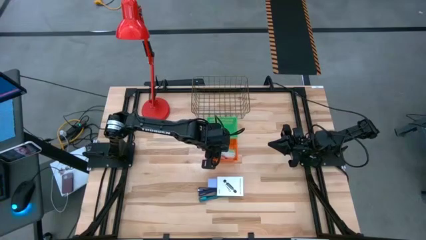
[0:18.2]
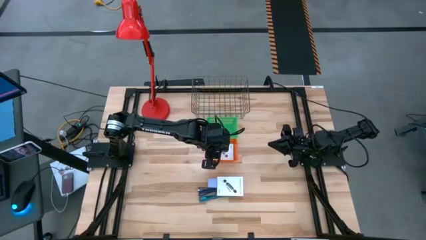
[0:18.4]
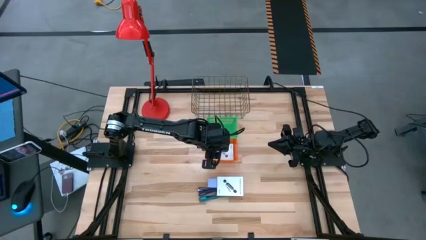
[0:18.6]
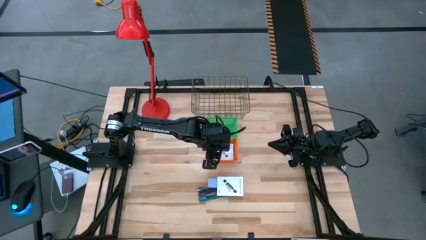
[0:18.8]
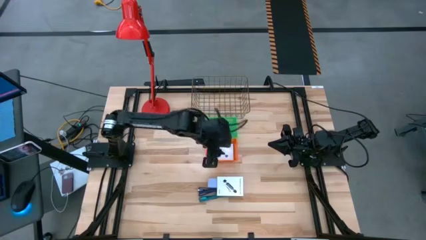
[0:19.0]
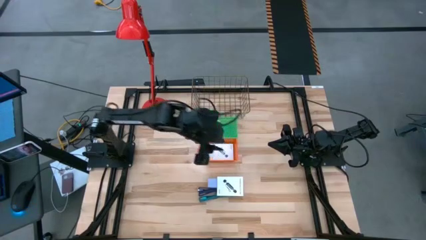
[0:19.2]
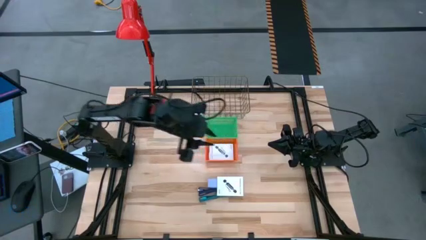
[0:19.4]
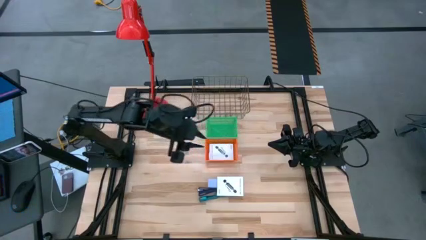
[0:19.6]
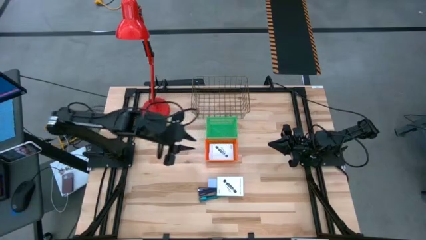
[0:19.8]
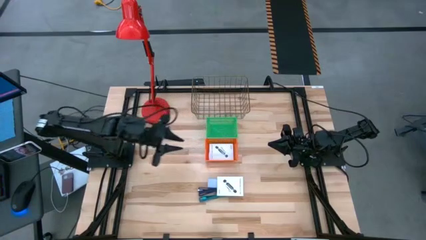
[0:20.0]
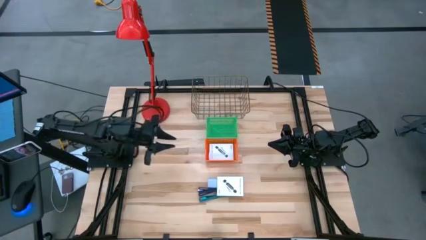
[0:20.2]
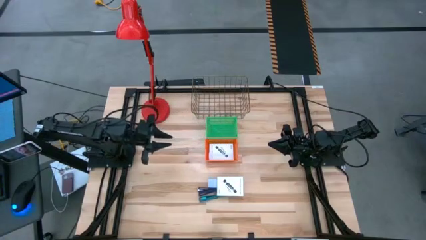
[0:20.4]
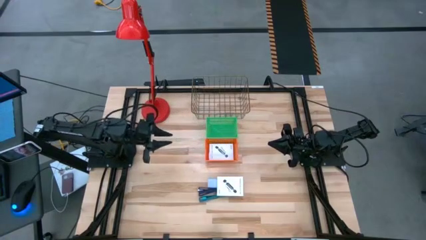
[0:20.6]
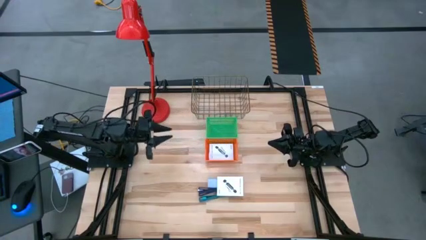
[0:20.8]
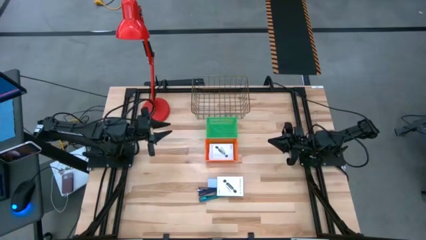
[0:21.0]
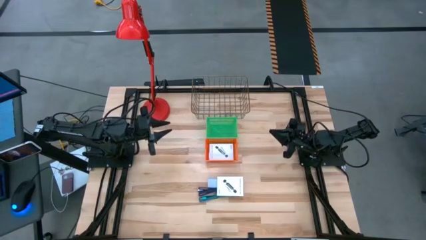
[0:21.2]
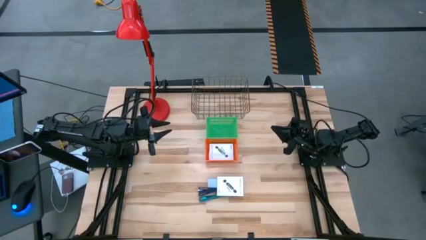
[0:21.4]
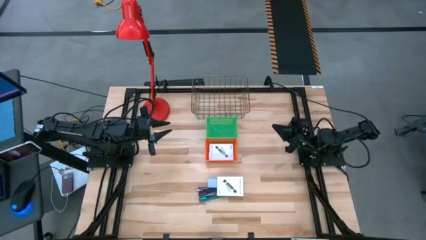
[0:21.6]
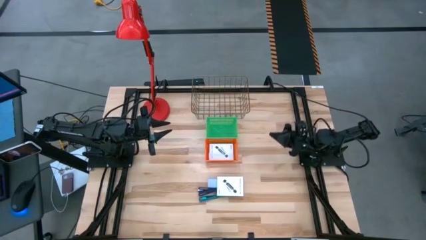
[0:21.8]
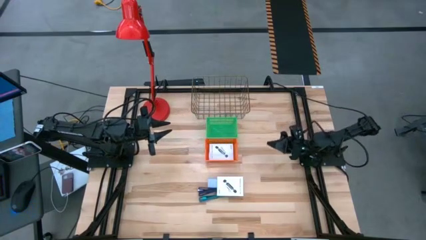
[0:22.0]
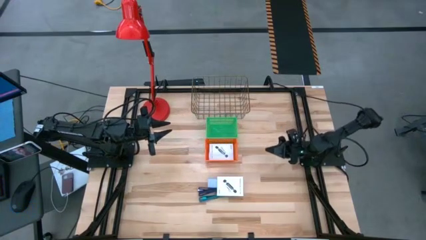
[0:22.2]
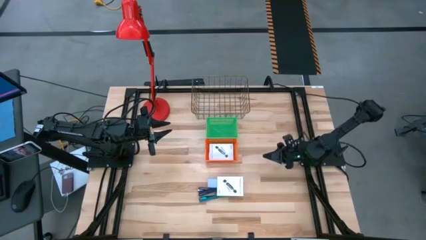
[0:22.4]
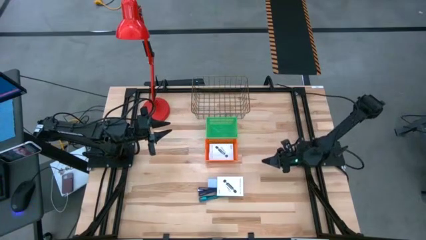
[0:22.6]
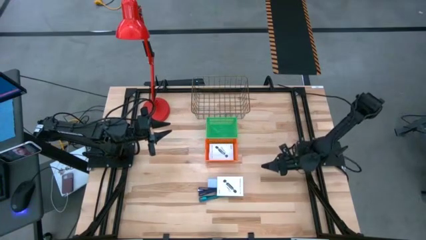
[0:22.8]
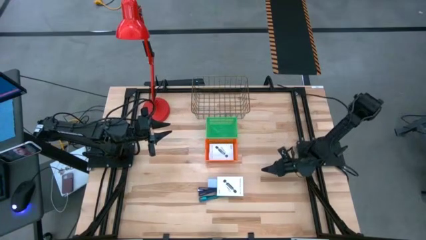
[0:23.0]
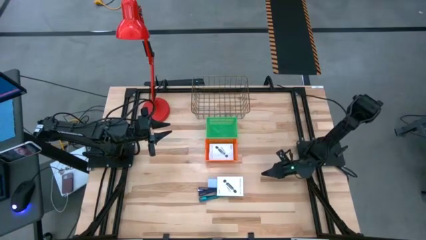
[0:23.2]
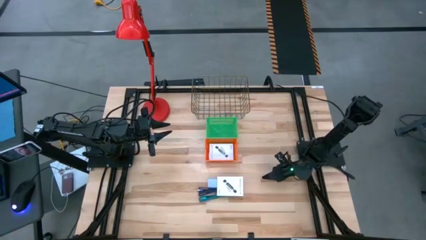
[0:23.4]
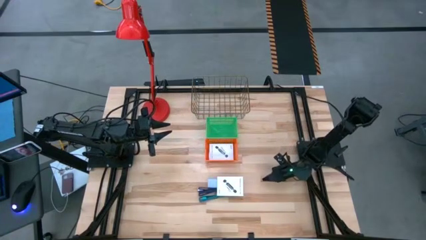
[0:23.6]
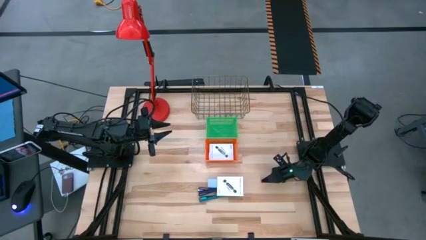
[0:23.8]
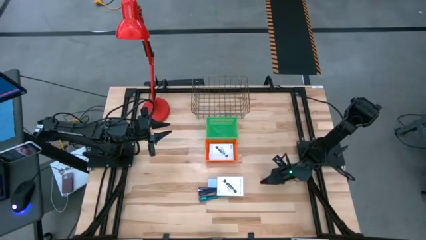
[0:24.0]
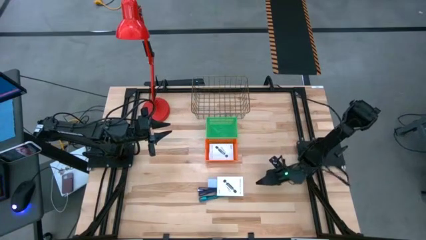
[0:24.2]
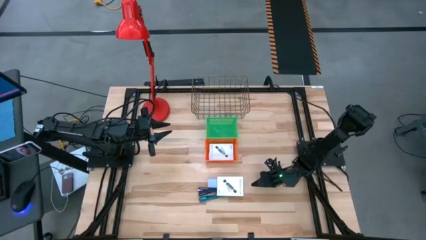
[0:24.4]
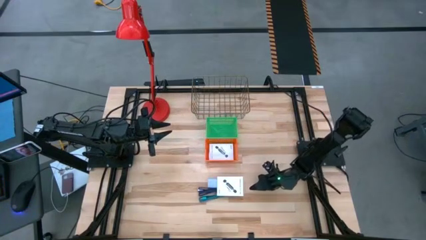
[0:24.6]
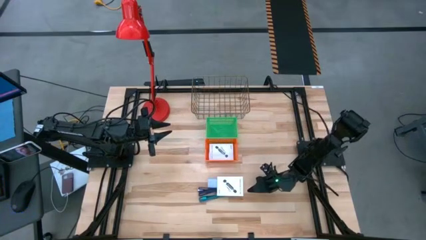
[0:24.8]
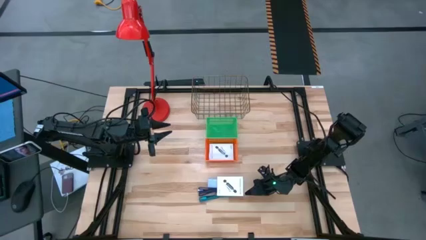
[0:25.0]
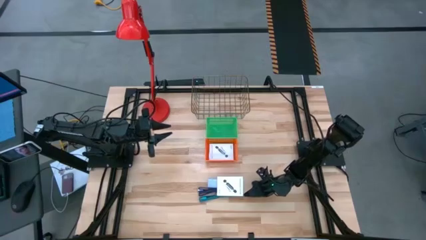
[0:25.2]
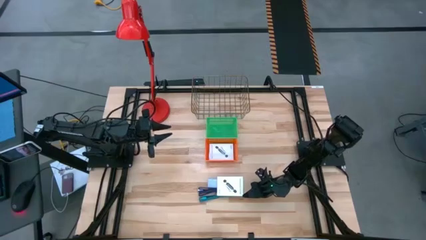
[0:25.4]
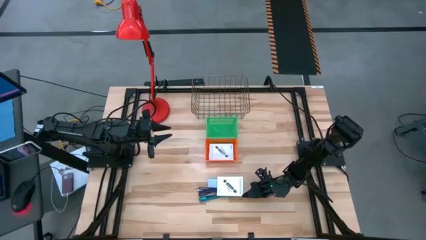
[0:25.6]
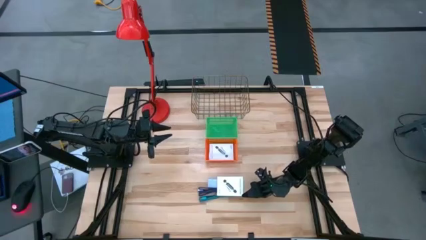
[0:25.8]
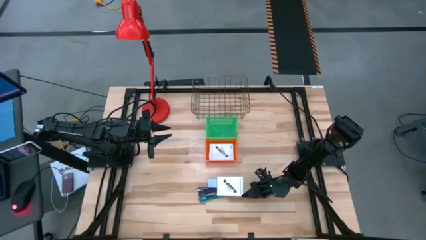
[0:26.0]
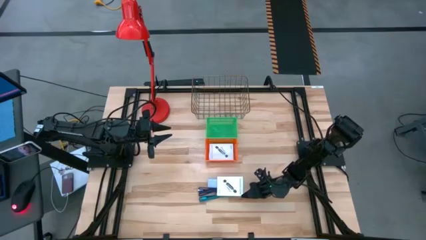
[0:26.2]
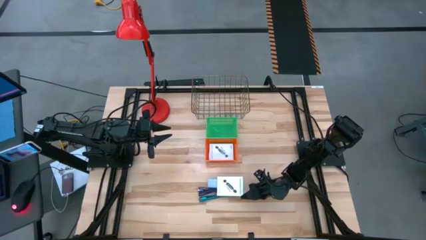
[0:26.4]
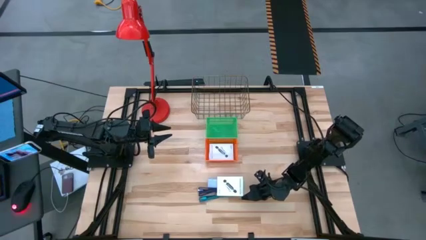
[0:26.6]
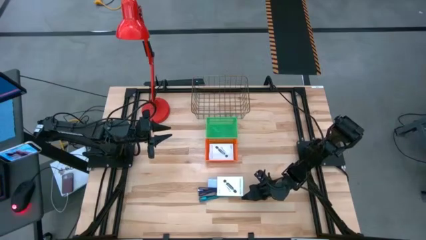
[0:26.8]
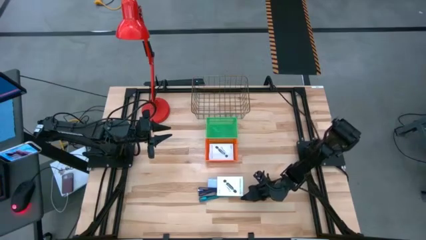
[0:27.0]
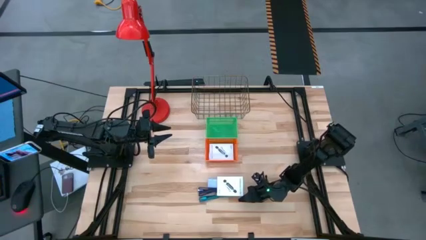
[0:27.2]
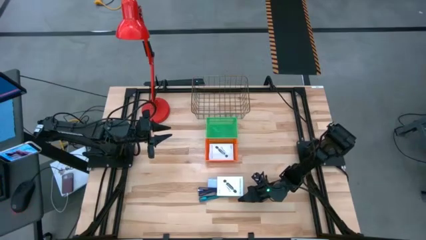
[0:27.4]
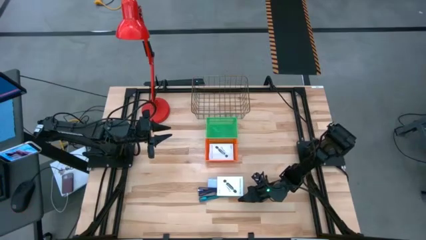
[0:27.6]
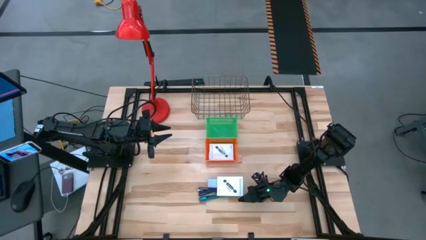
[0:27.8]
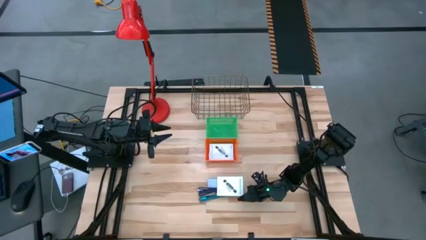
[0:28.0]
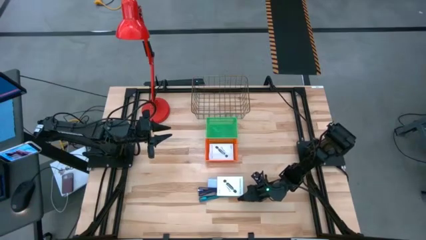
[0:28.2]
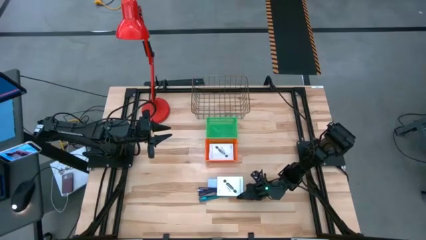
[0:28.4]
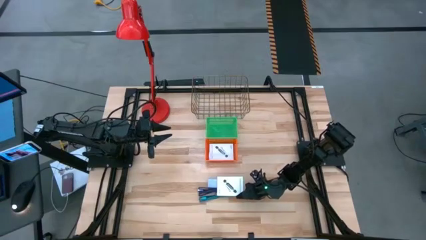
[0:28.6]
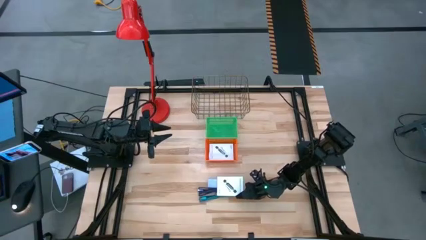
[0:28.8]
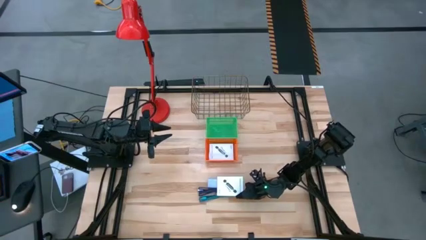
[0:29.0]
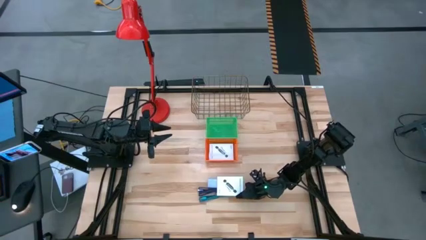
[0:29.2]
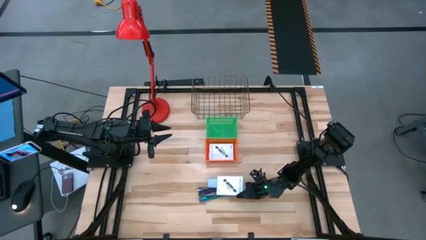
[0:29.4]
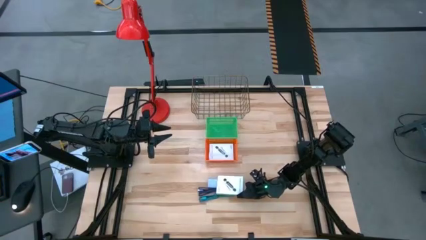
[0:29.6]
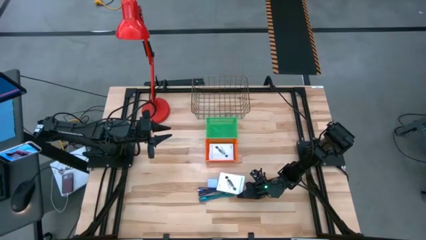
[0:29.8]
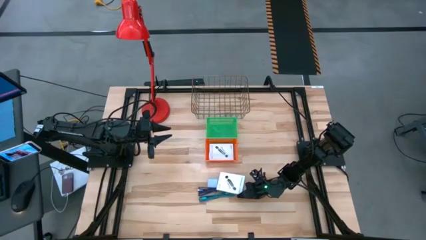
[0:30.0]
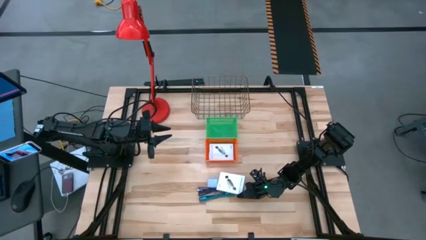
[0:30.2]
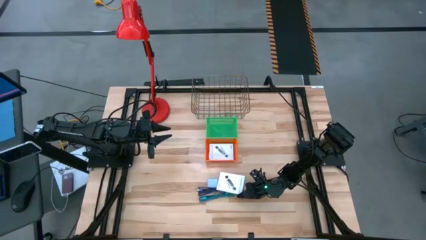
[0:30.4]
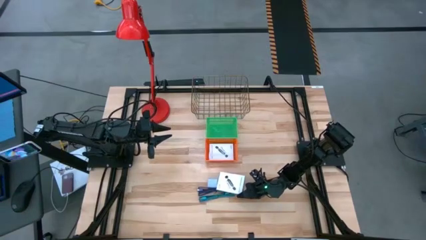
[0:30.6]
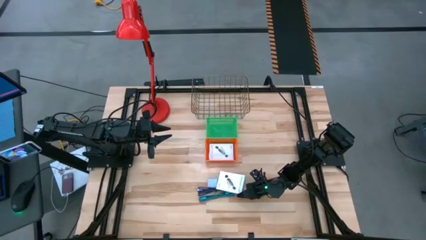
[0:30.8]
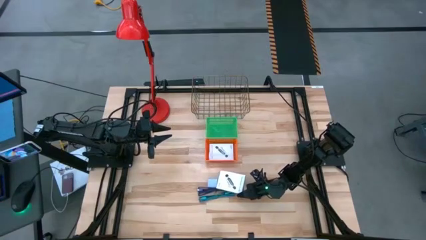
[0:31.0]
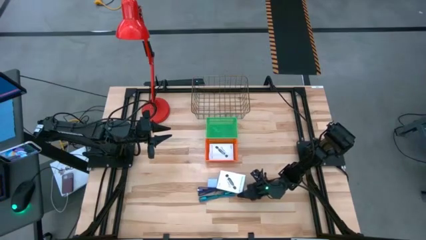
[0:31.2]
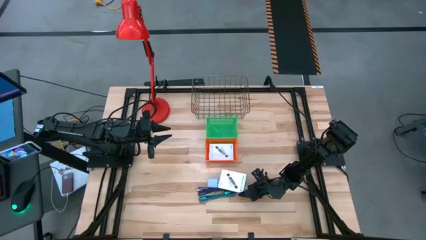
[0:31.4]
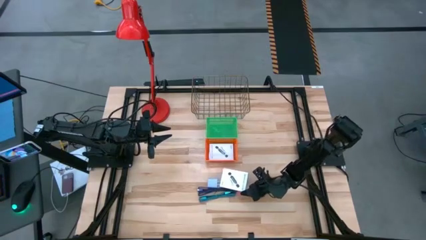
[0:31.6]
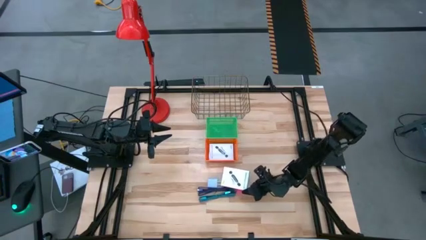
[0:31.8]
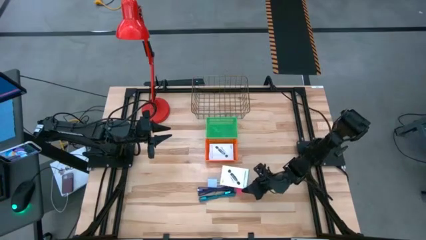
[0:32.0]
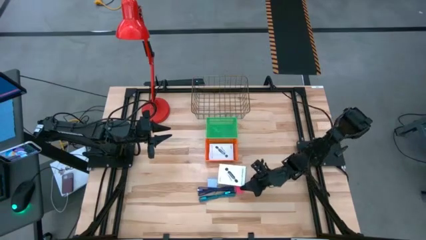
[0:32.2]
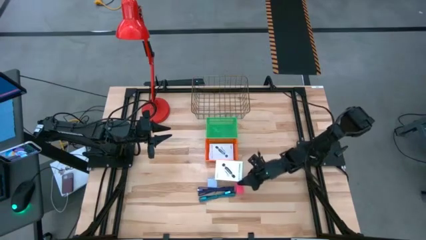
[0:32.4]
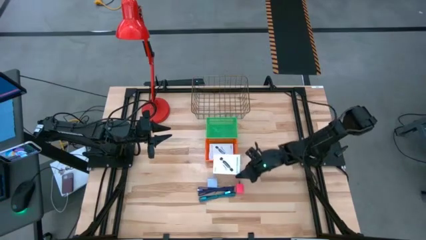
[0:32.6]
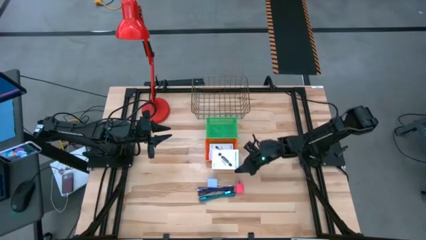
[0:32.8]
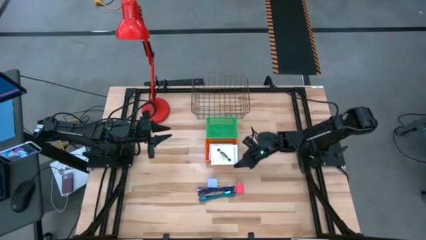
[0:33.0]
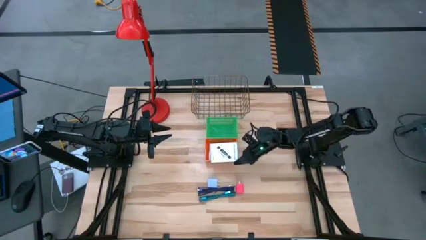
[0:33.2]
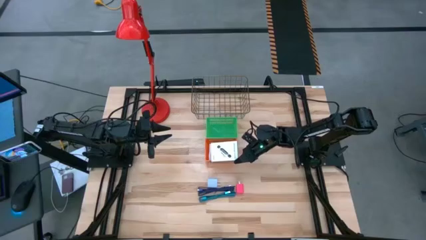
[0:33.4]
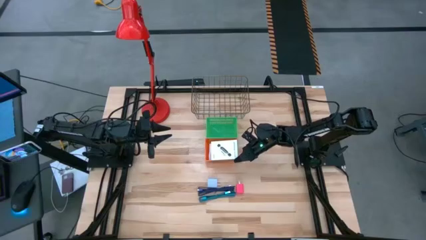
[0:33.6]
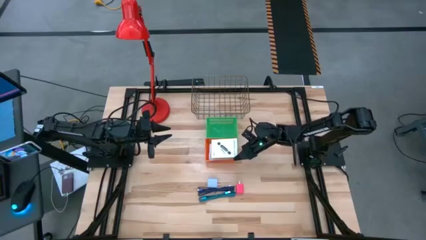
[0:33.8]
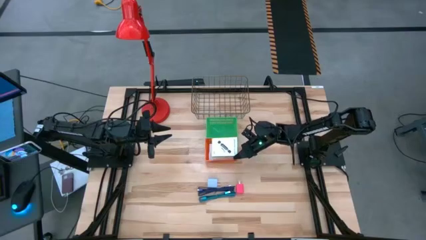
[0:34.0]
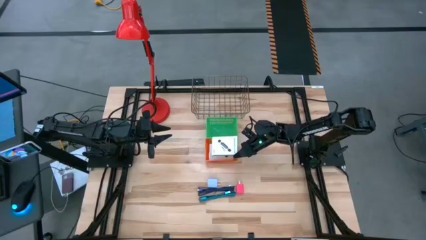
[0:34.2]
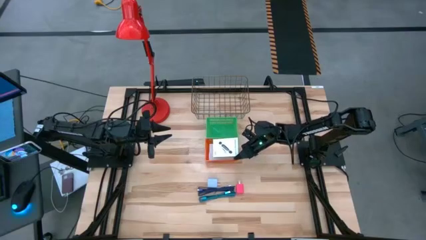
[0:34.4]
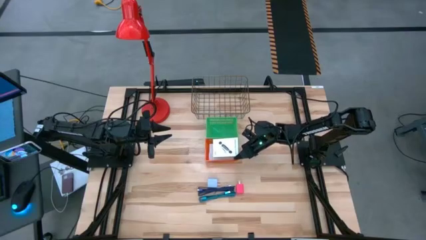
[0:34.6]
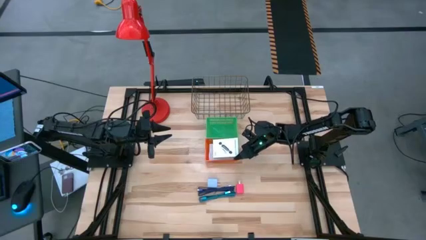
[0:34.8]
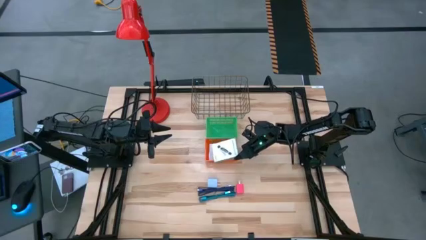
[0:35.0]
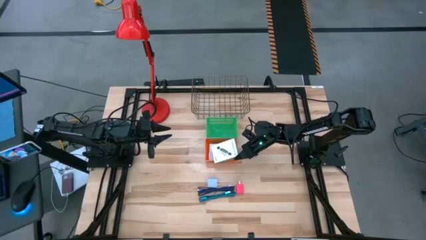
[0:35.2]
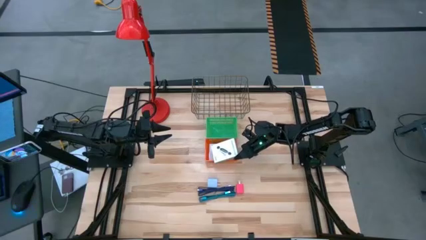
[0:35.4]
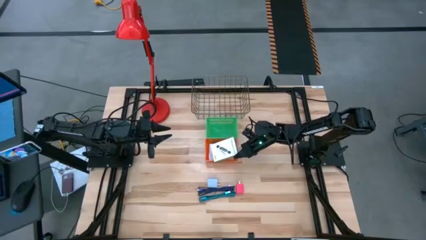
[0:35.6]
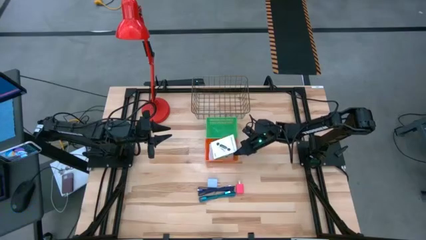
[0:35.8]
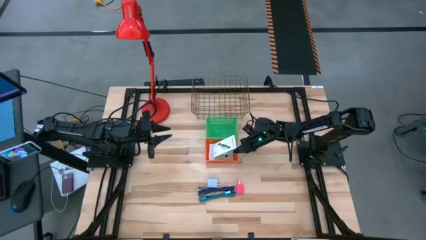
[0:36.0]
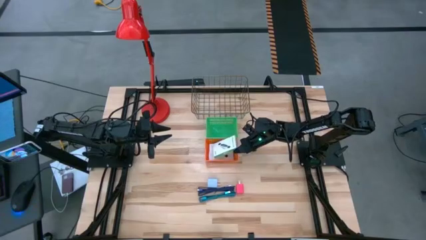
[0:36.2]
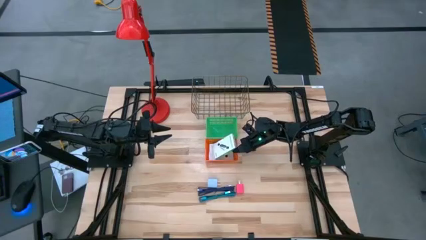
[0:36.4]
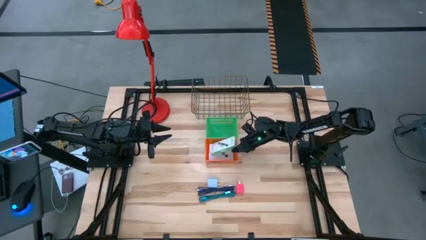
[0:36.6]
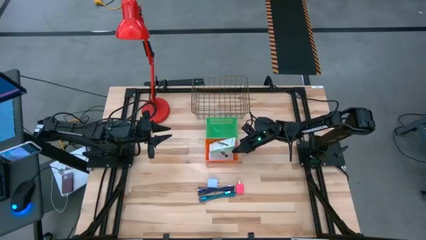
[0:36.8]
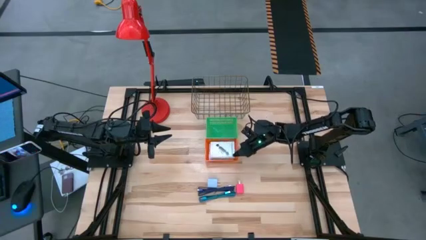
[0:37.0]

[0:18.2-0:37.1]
Task: Pick and place items into bin
Put the white card reader box into the orange basket
